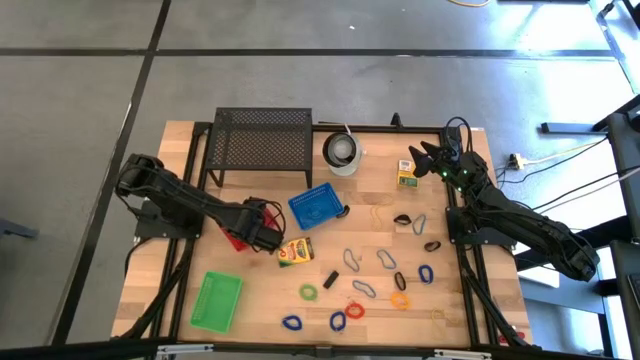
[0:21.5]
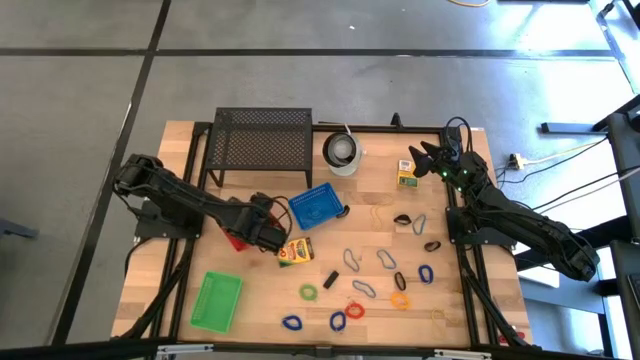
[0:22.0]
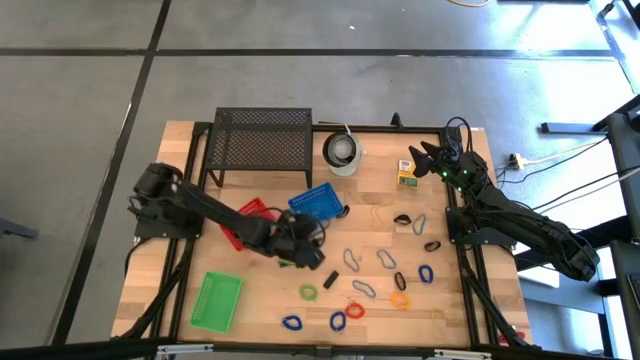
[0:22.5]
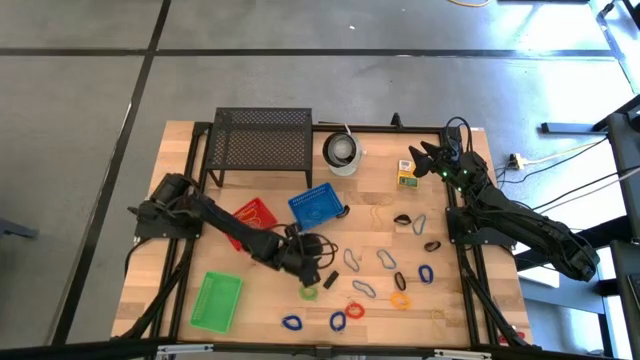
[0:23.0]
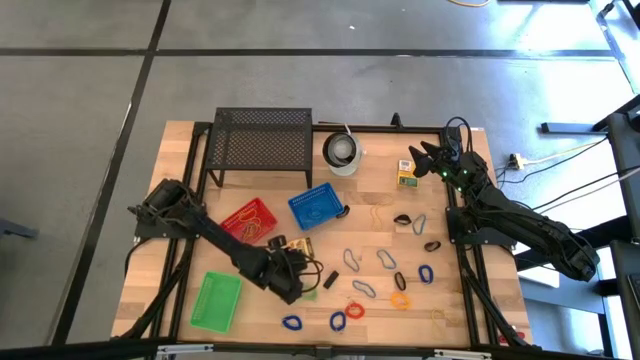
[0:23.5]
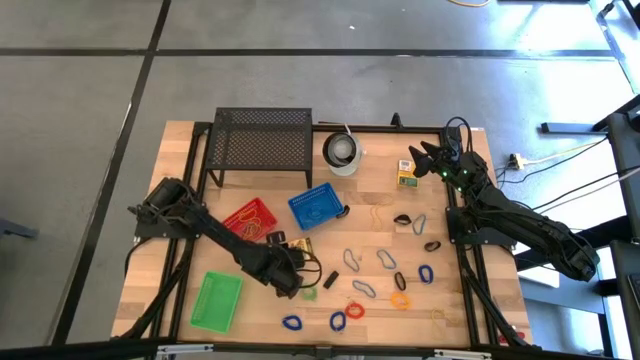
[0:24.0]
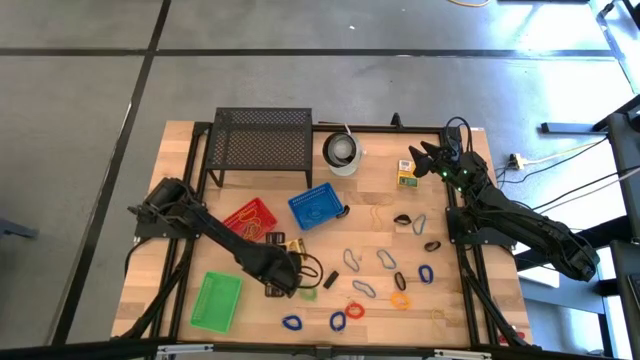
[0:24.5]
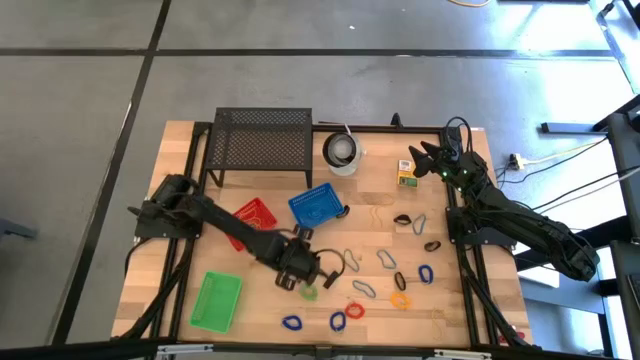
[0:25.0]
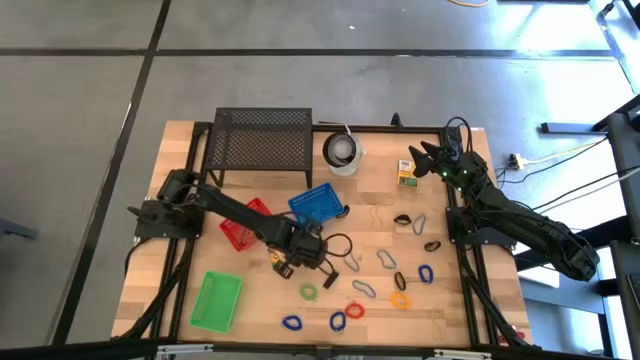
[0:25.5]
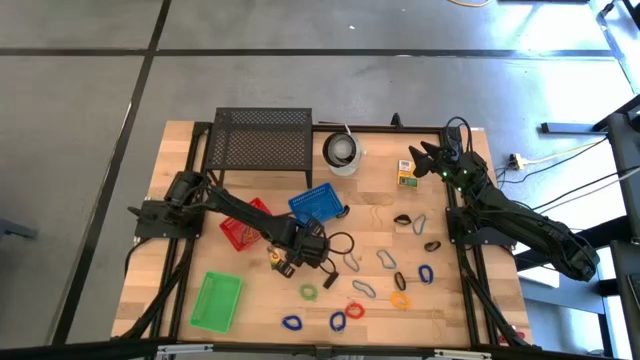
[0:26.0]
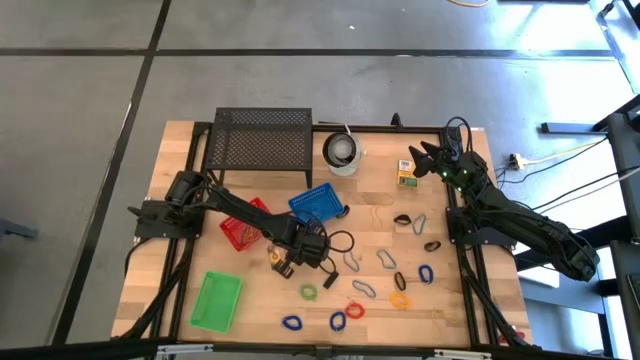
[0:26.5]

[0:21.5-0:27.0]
Task: Pick & Place Office Desk Supplies
Put the crayon box into the green bin

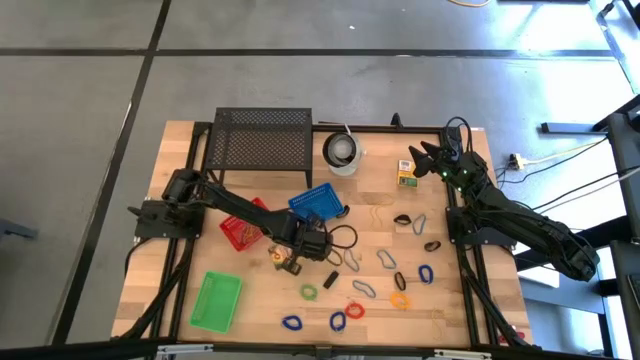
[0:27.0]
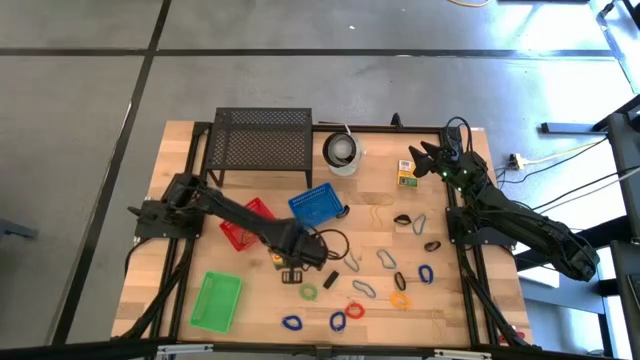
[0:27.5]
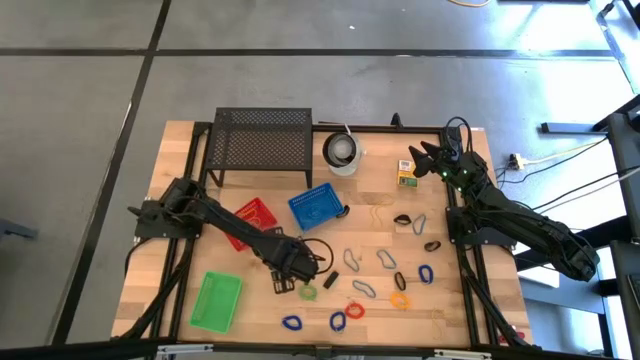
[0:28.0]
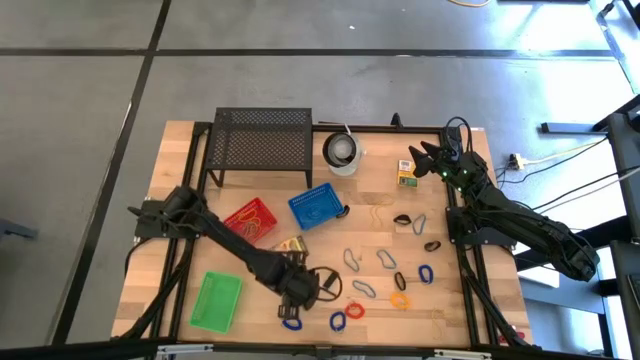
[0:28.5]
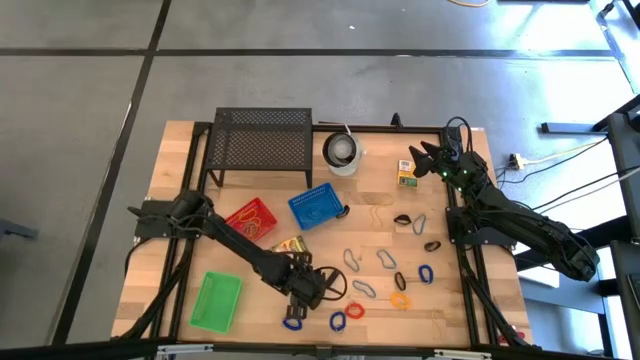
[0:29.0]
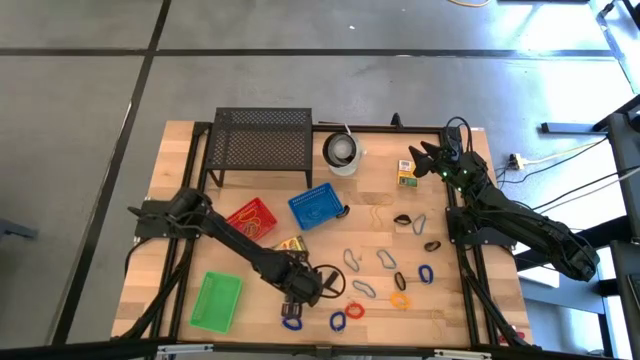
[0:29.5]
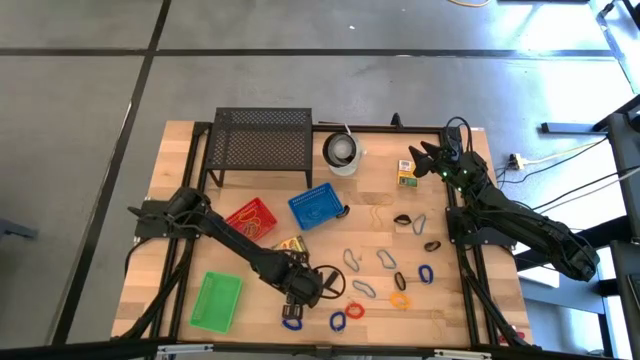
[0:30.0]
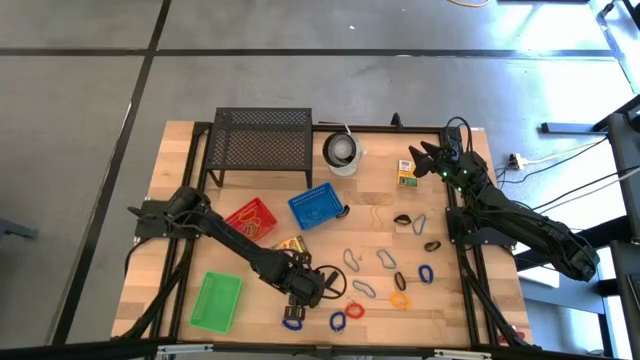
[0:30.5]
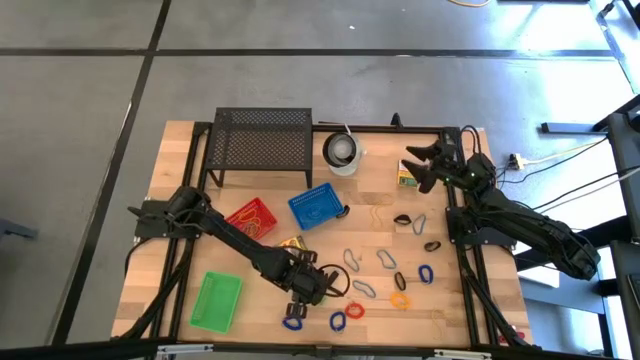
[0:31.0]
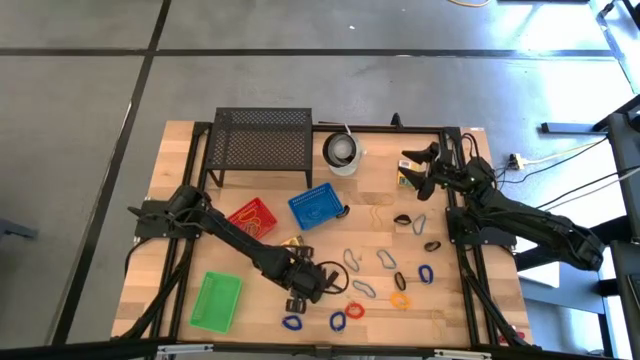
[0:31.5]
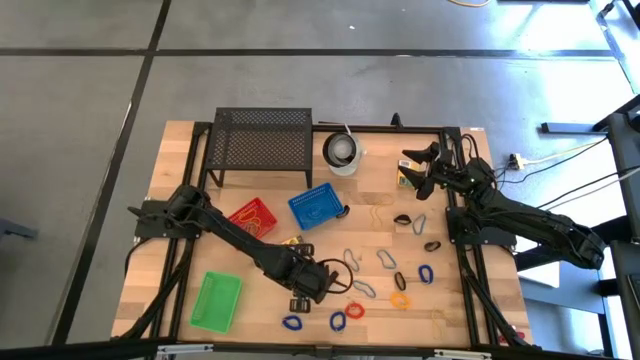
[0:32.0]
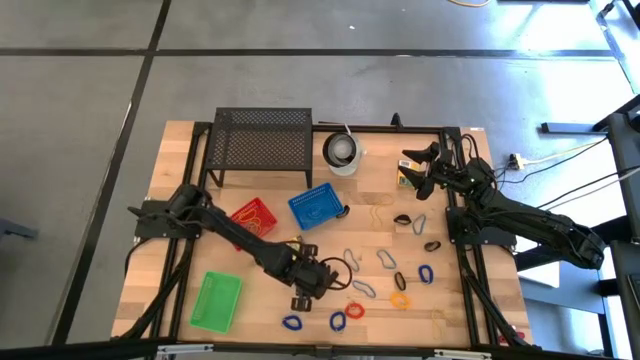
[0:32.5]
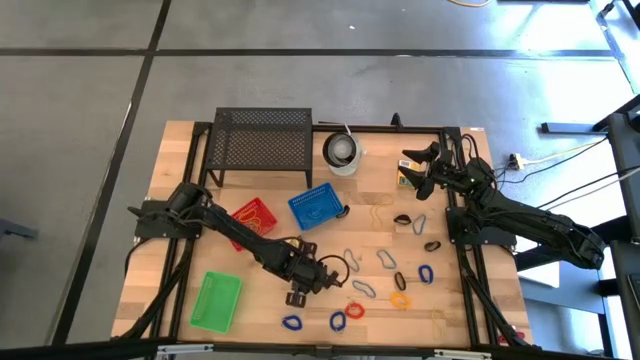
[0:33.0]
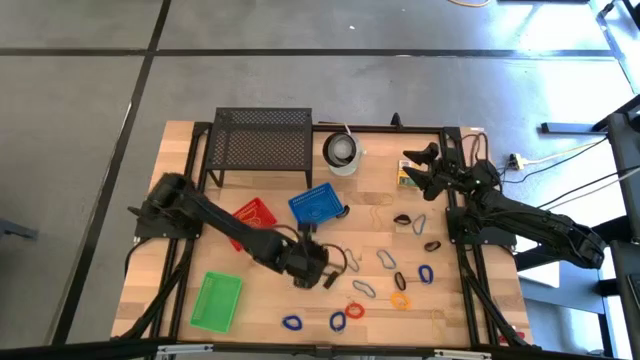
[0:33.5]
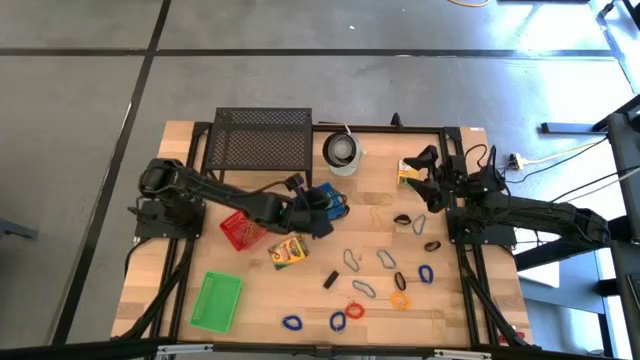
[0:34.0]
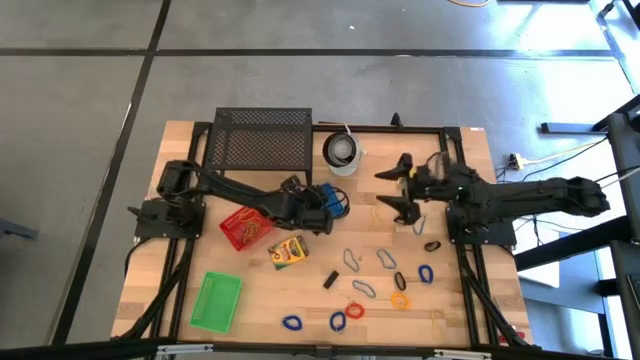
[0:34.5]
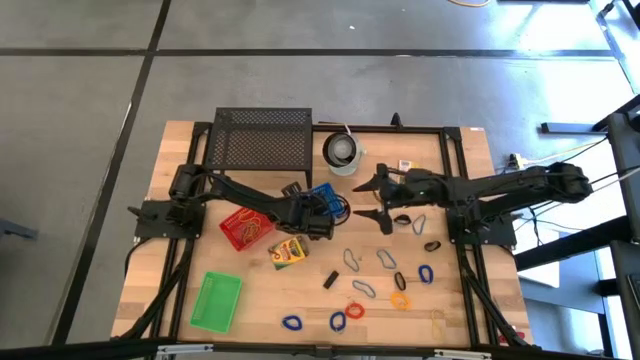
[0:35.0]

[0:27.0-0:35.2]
Put the green spring keychain into the blue bin

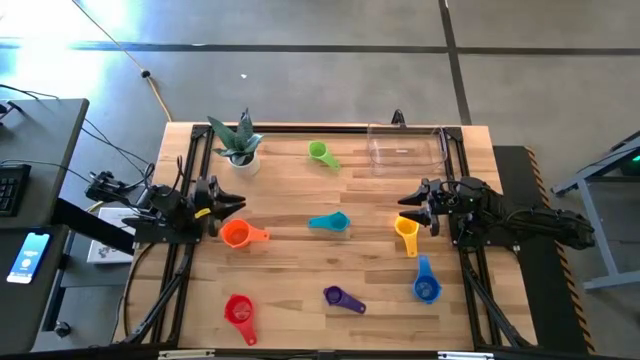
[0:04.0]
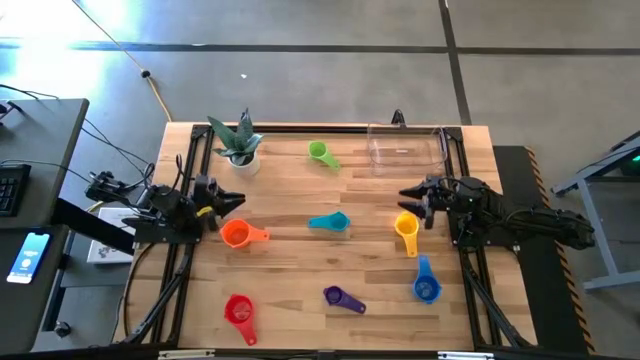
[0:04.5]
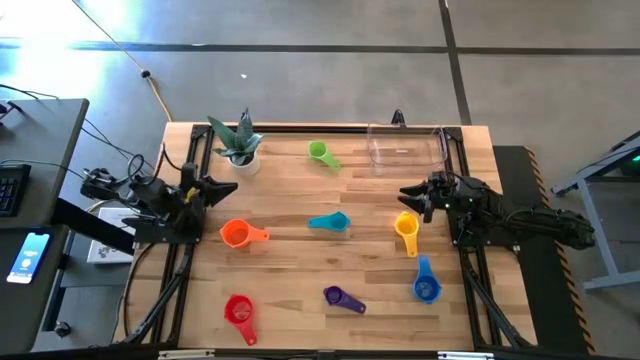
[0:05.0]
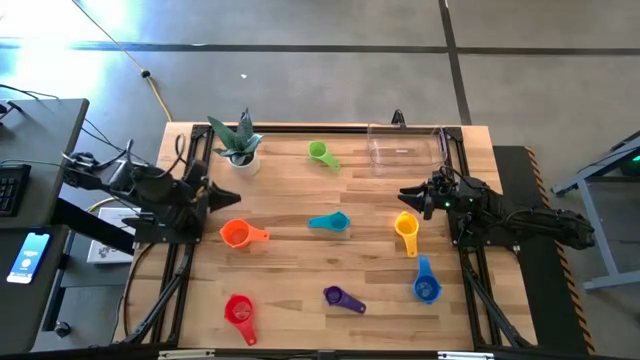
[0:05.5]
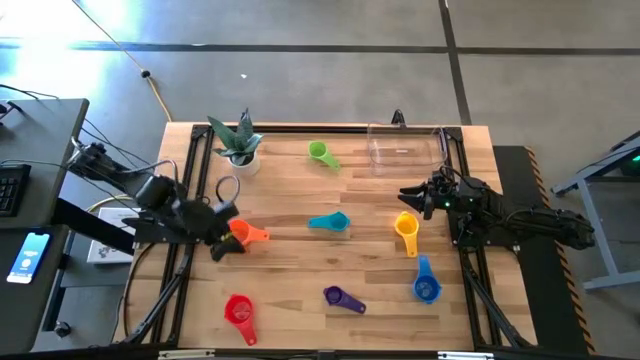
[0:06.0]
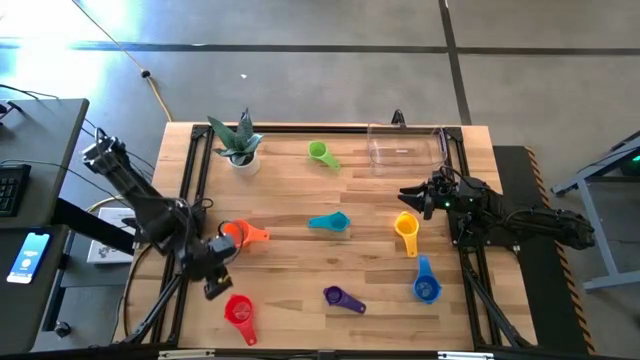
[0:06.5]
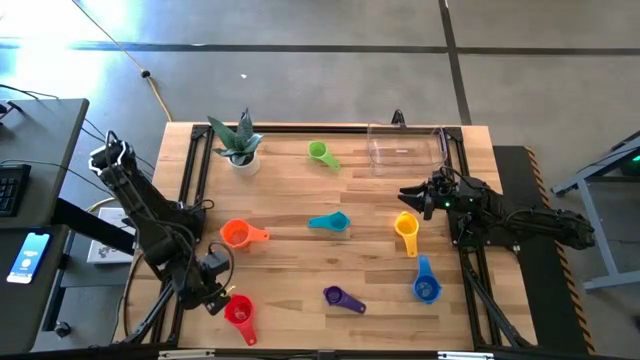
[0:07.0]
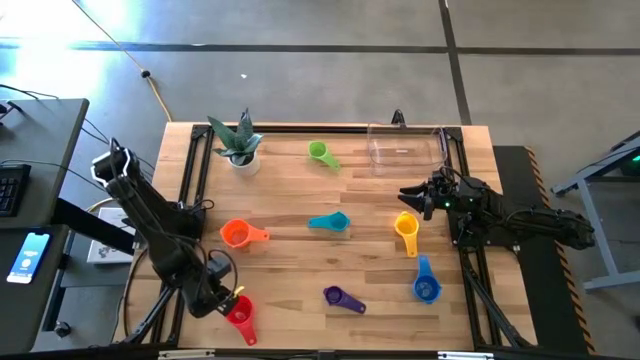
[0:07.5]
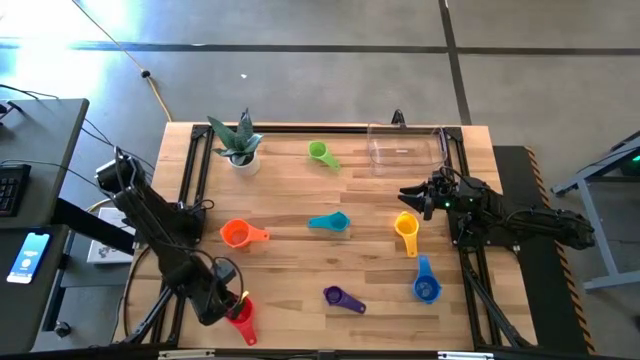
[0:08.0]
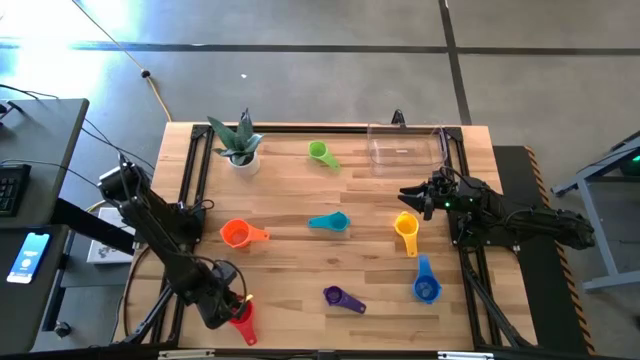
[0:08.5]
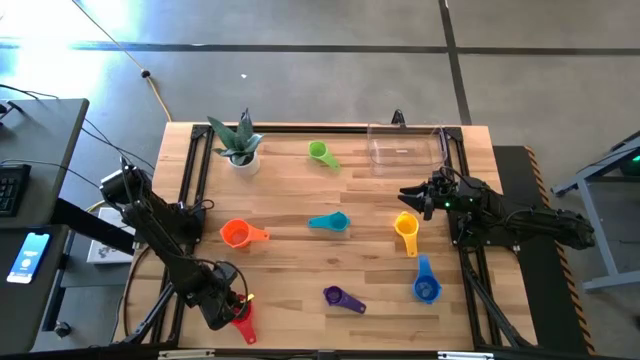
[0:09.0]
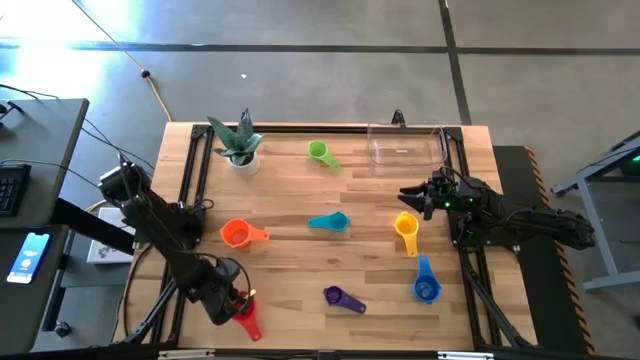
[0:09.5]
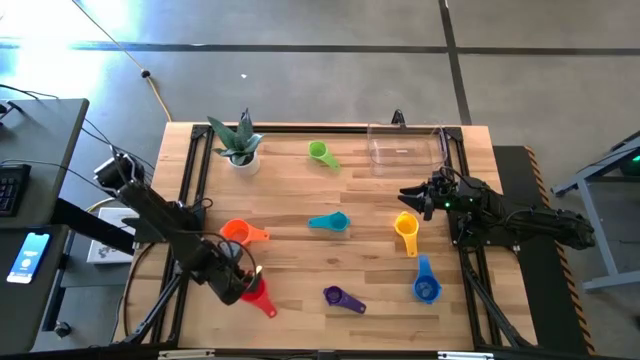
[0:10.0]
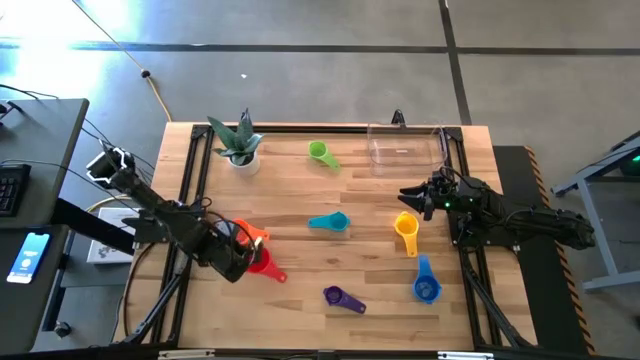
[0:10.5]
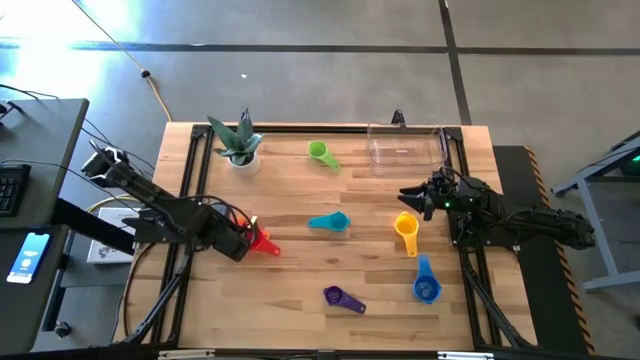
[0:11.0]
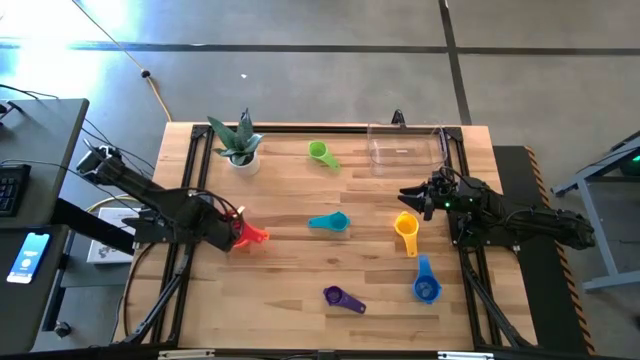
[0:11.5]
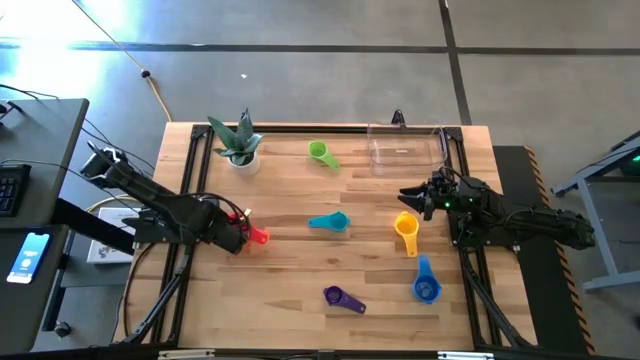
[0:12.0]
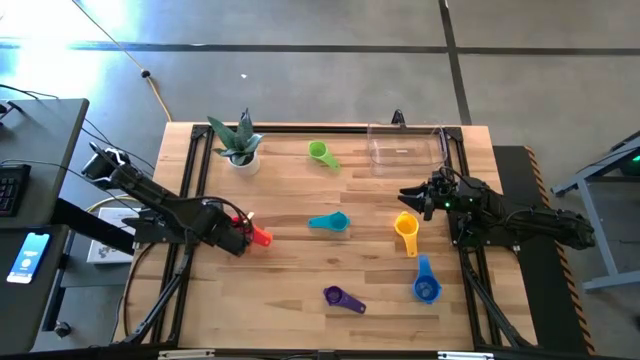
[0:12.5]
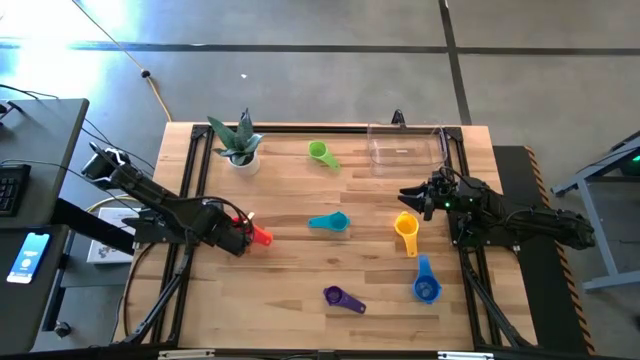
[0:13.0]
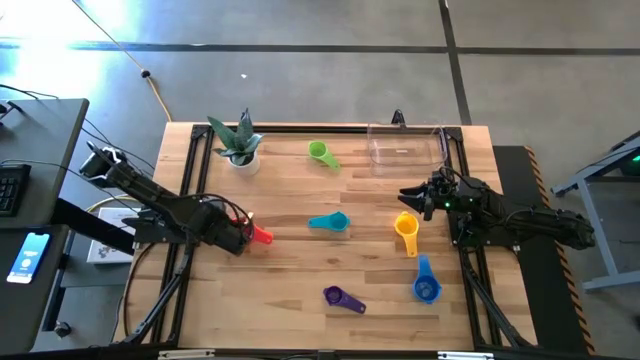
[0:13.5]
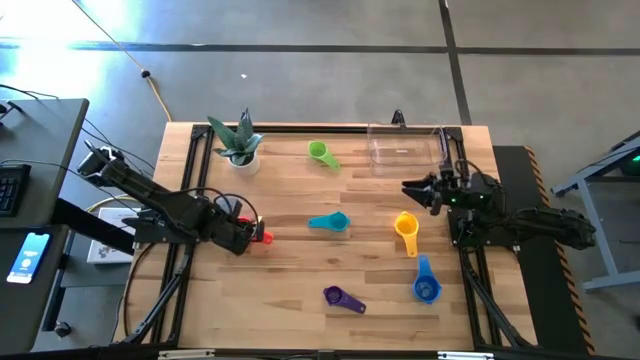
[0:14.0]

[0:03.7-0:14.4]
Task: Nest measuring cups in basket
Stack thr red measuring cup into the orange measuring cup
